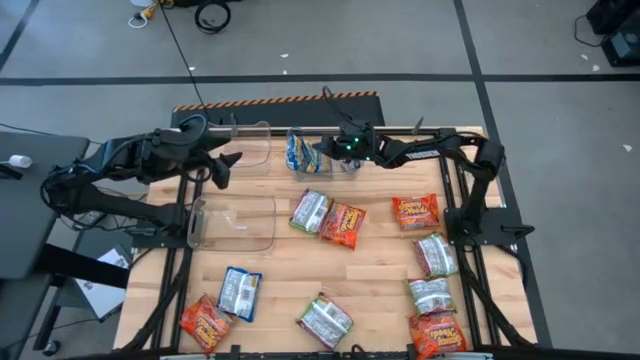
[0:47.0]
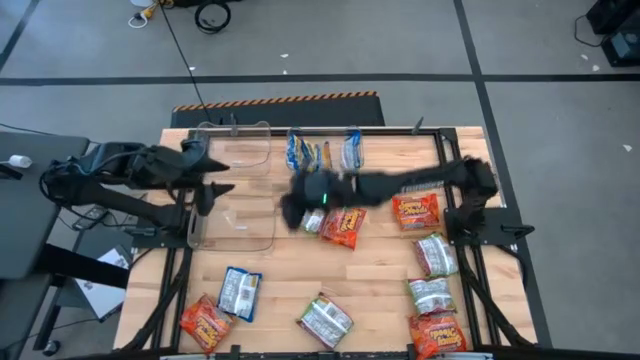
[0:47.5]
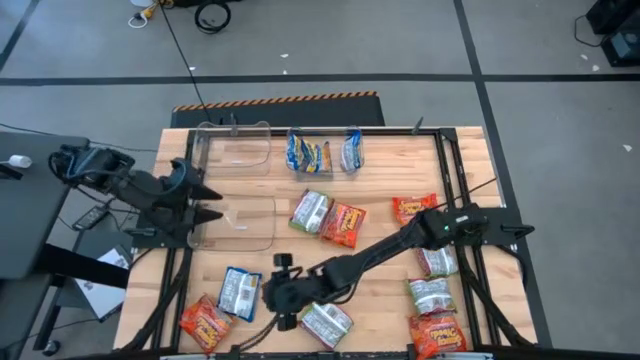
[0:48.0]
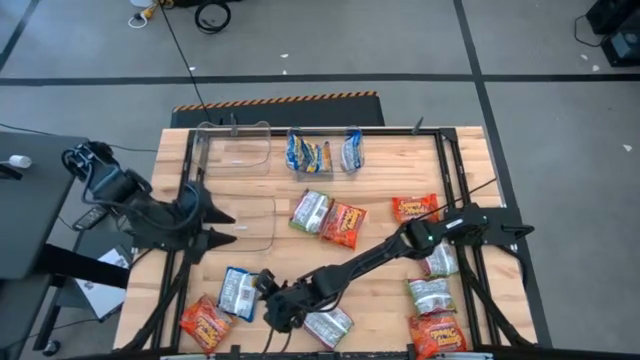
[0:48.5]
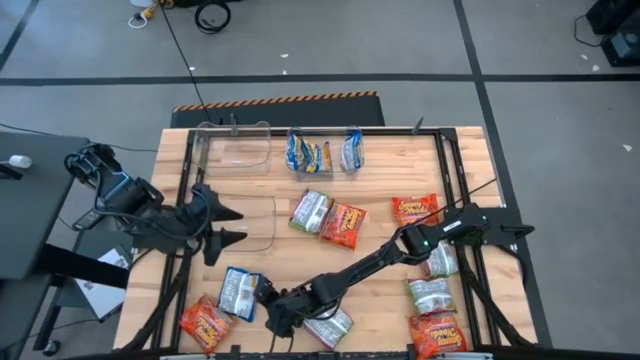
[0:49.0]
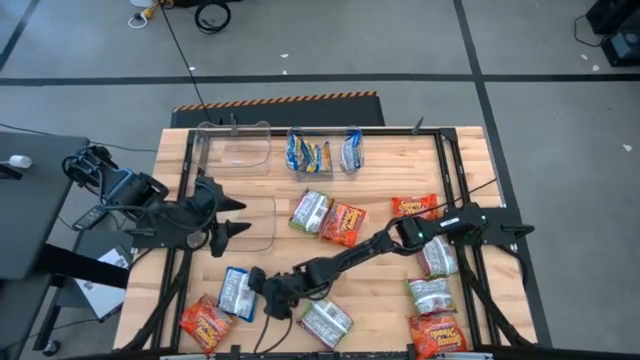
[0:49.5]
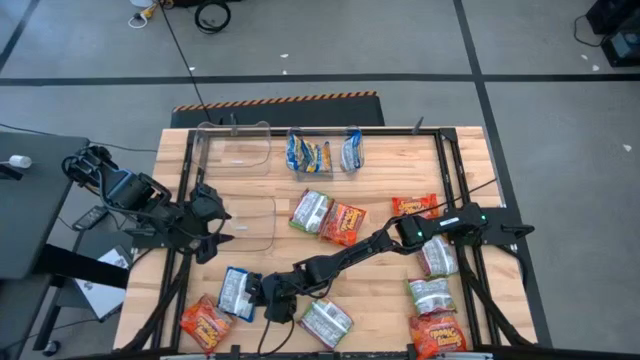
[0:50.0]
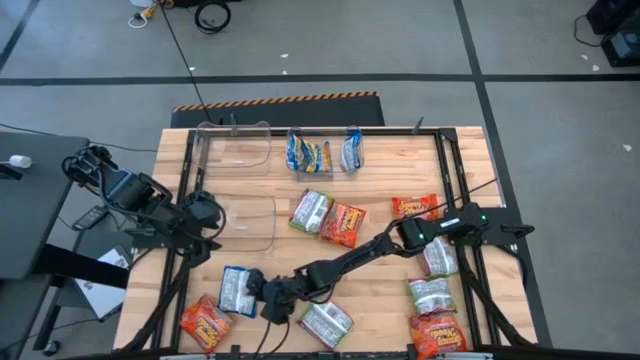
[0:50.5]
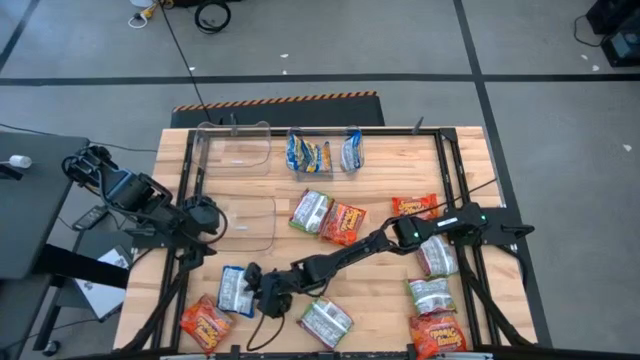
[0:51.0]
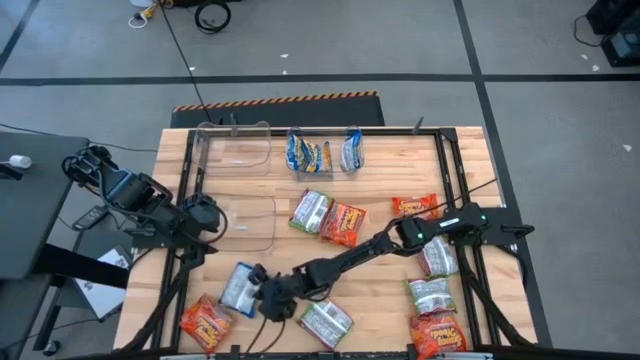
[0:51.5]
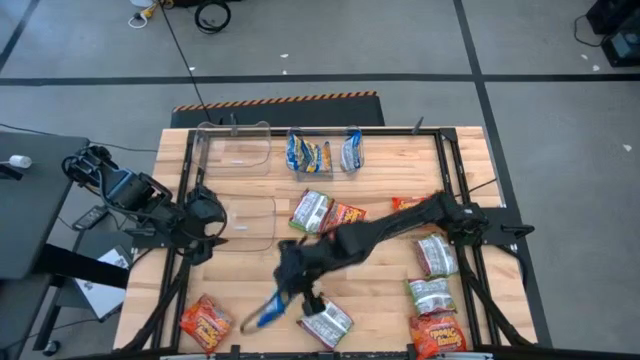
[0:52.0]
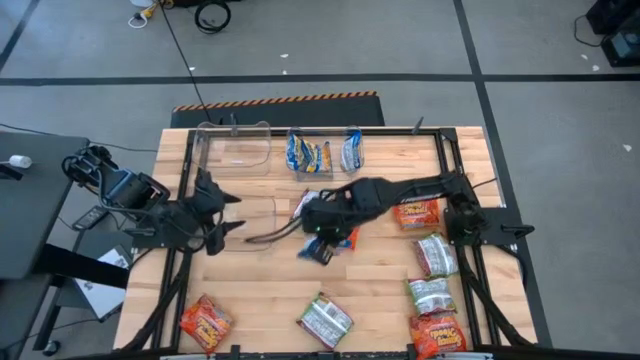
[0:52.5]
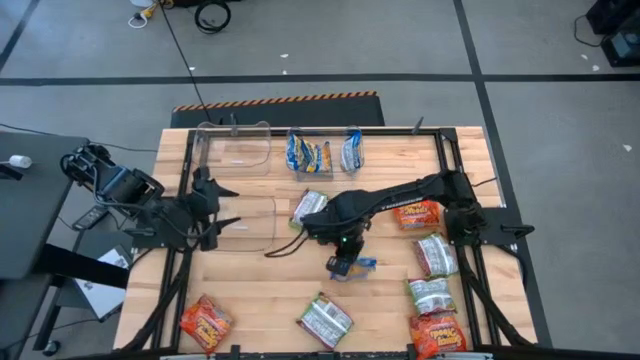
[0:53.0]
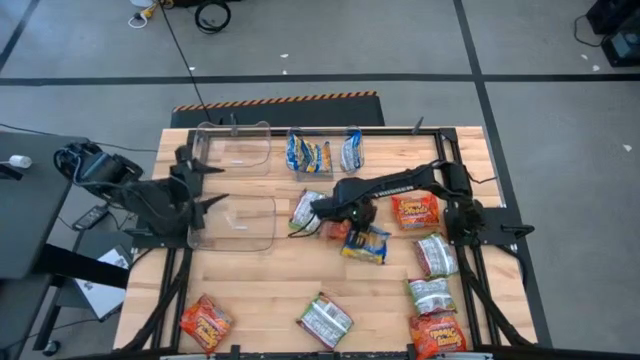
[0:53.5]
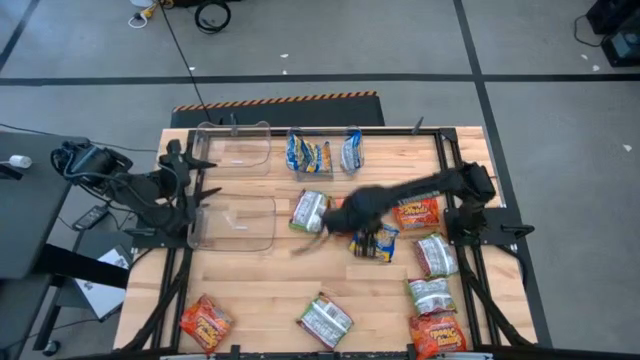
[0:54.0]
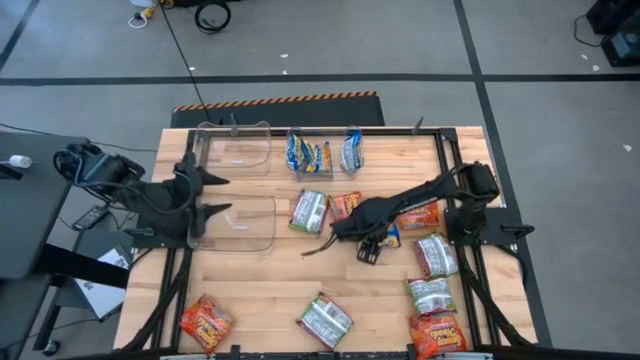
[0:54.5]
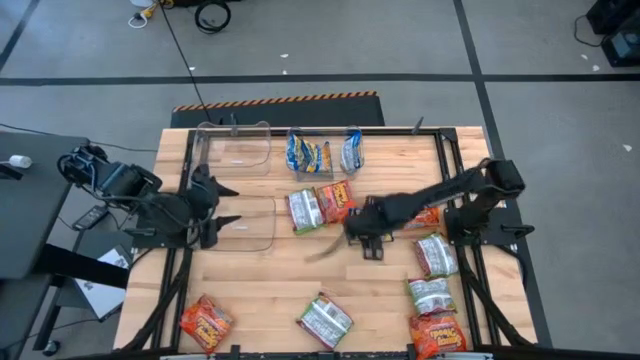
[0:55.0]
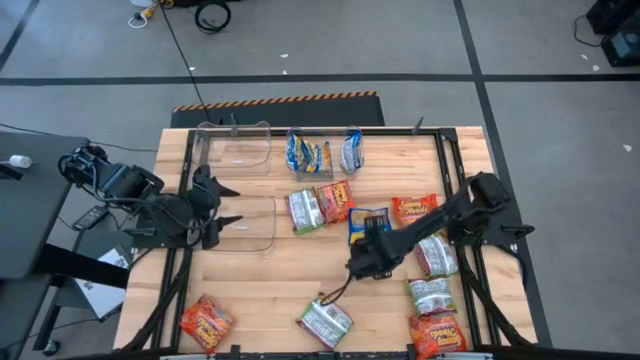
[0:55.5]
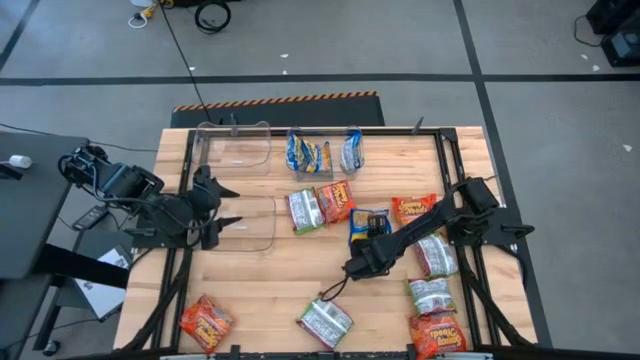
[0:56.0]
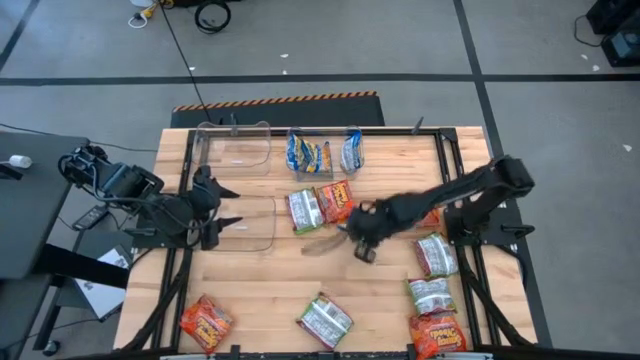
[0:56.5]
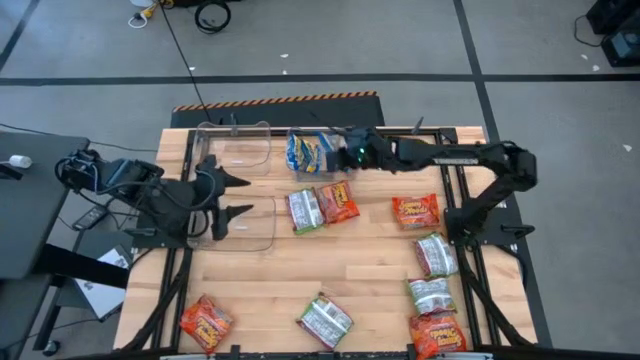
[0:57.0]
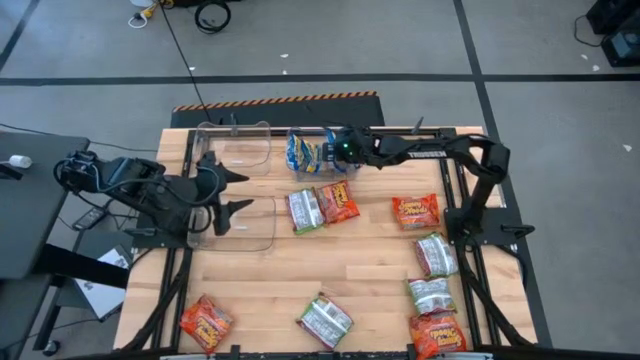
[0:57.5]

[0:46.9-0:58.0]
Task: Sort Maruchan noodles
Put the blue noodle pack into the right transparent bin

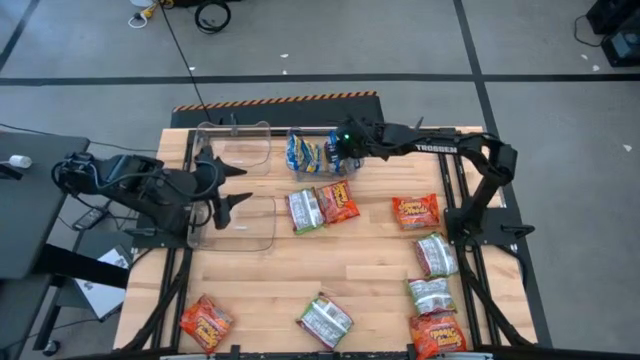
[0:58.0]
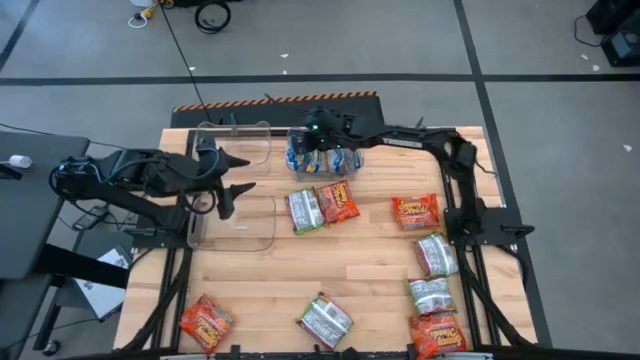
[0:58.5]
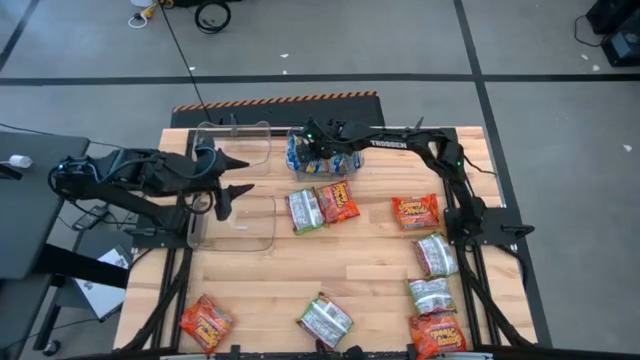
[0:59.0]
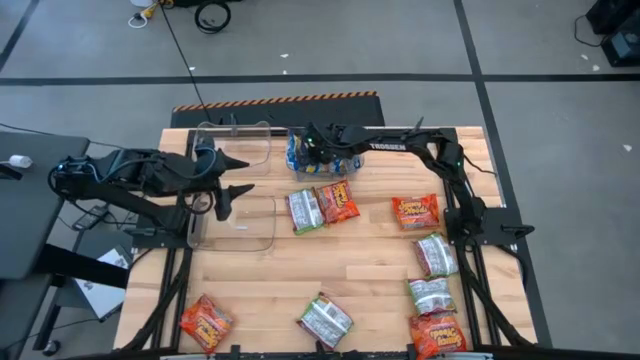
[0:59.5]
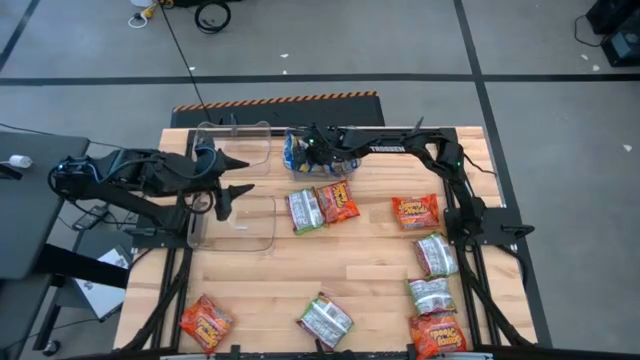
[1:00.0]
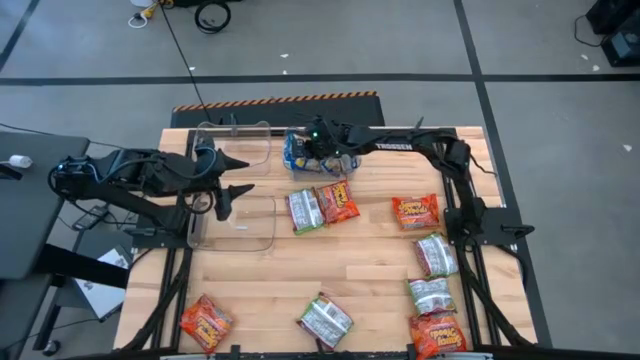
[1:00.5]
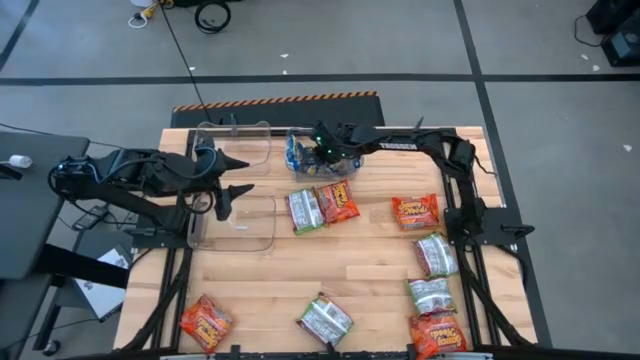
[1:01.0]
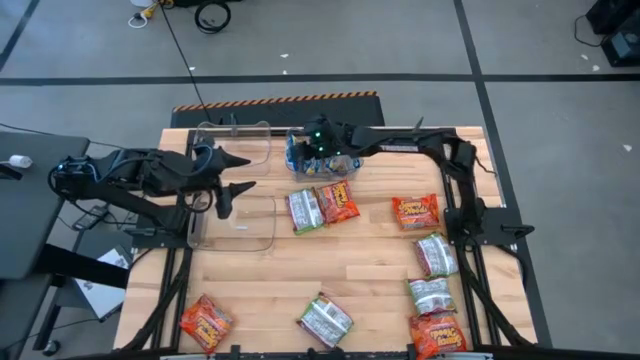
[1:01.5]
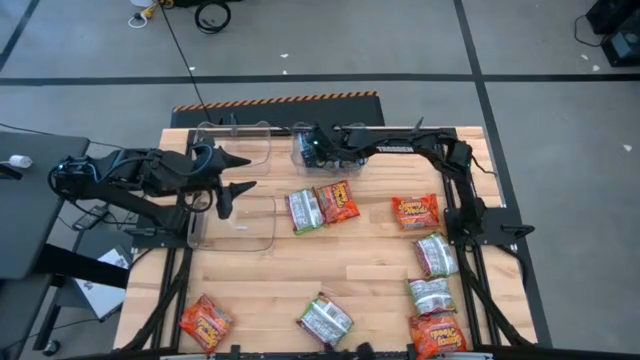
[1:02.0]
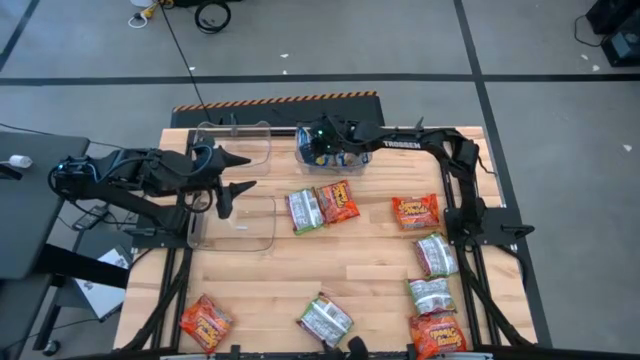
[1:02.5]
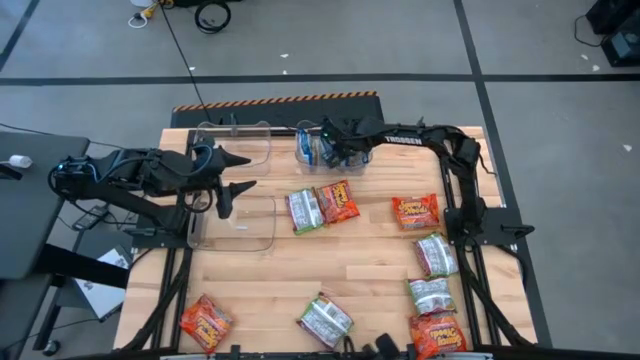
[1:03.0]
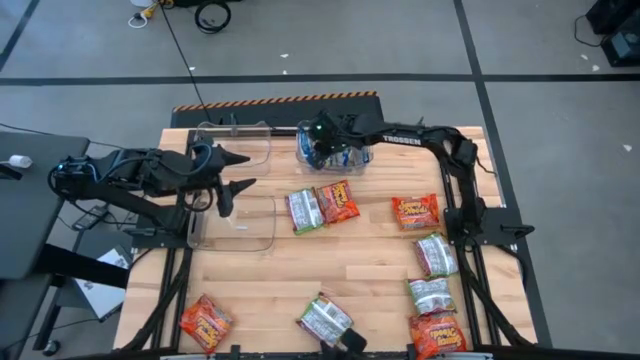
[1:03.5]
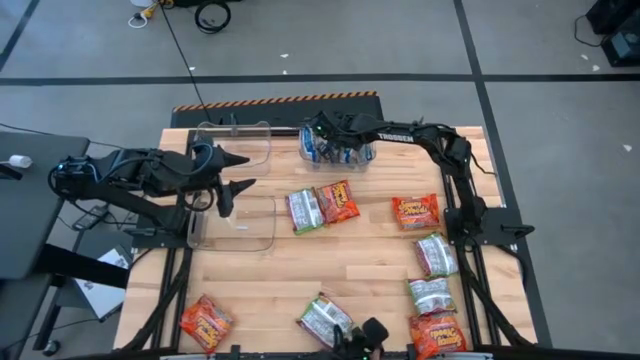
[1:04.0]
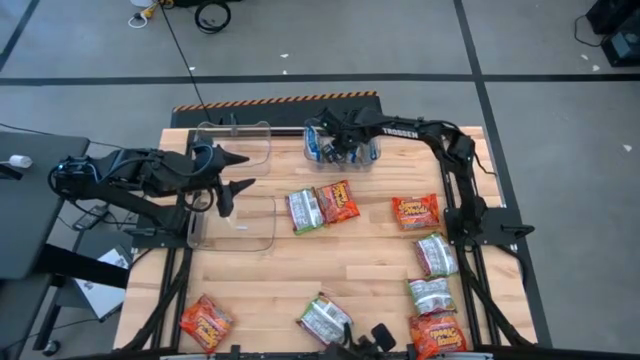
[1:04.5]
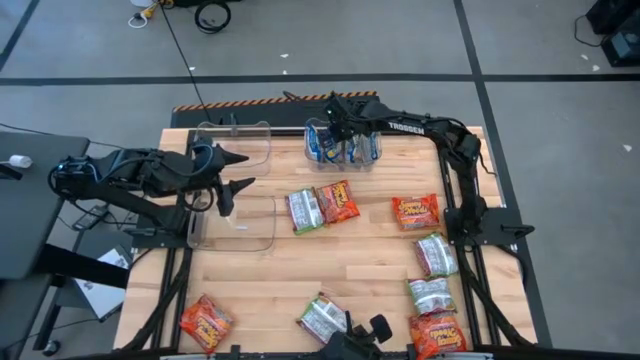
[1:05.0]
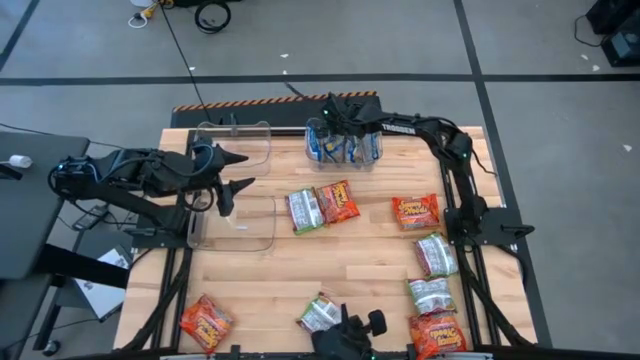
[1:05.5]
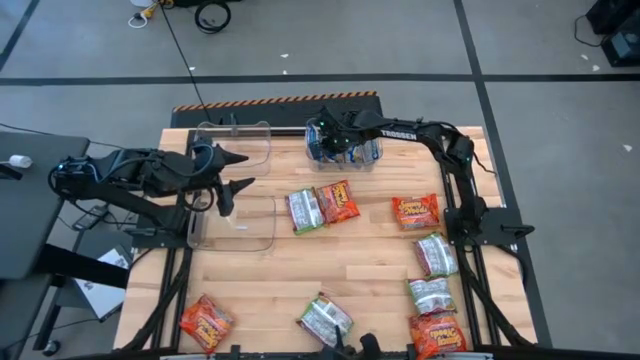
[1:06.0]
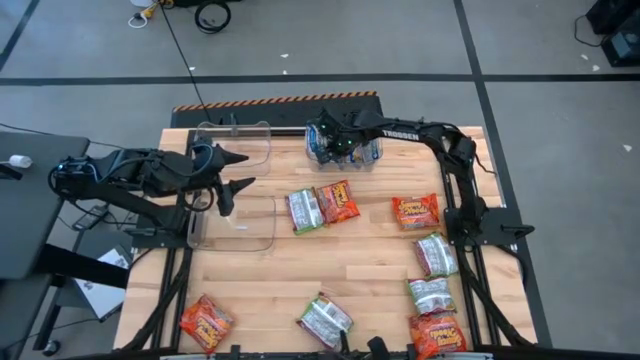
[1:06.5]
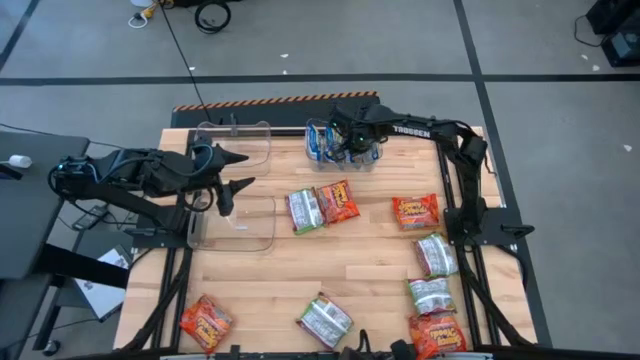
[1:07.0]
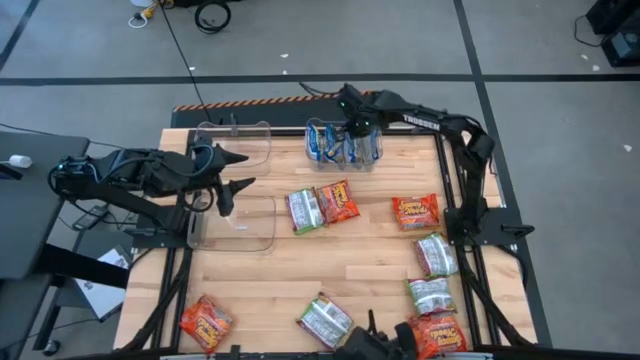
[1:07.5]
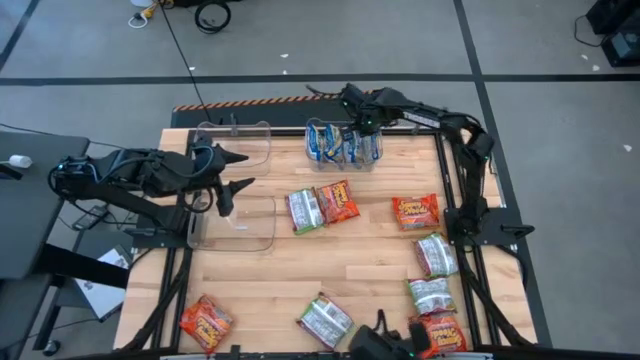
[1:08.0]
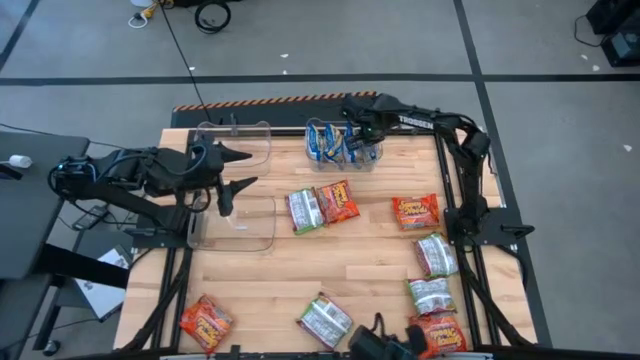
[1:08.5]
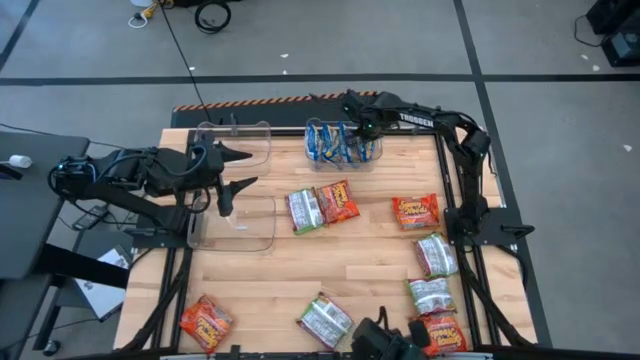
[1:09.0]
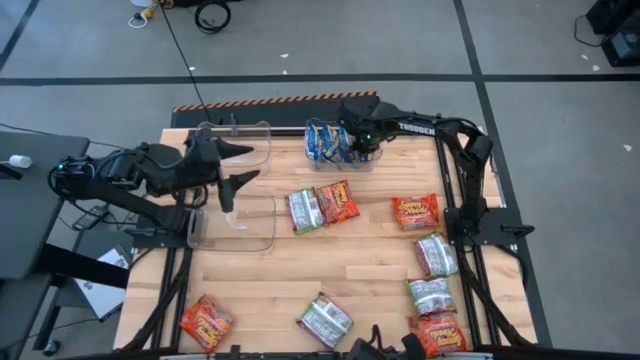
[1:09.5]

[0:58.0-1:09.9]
Adjust the blue noodle packs into the right transparent bin
